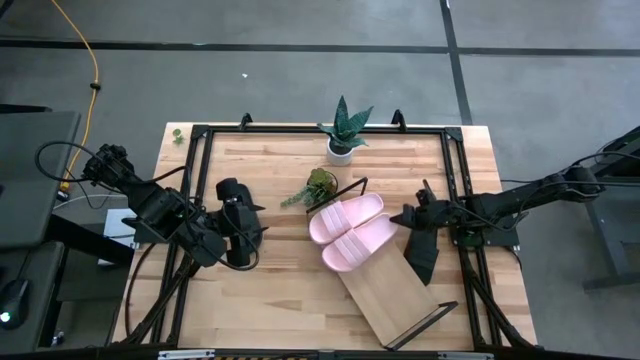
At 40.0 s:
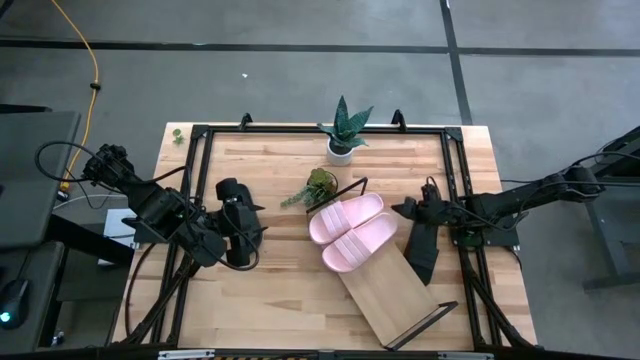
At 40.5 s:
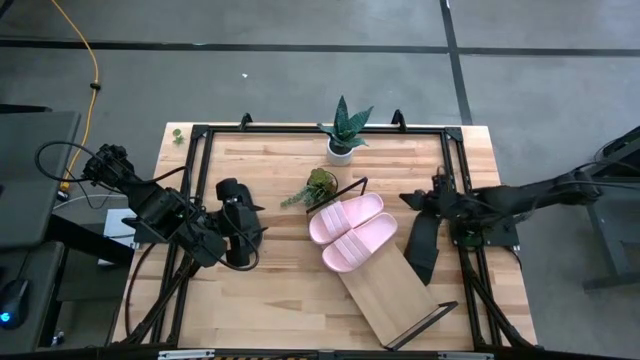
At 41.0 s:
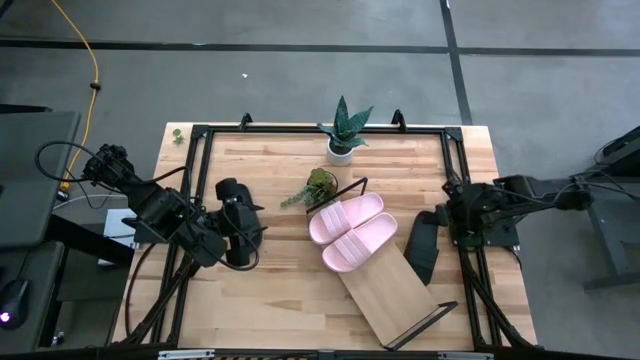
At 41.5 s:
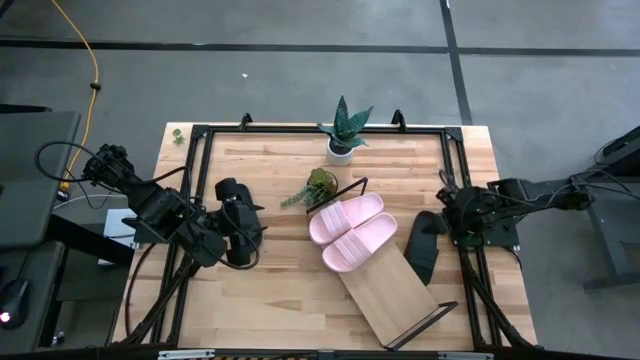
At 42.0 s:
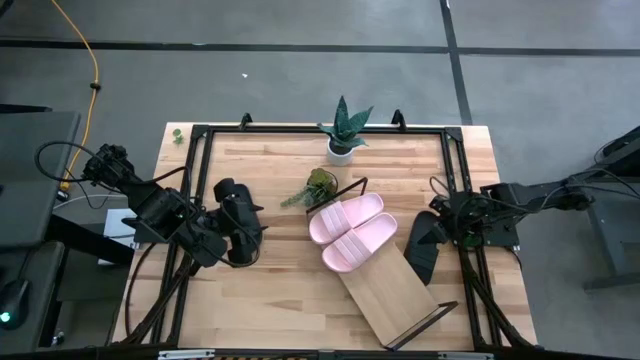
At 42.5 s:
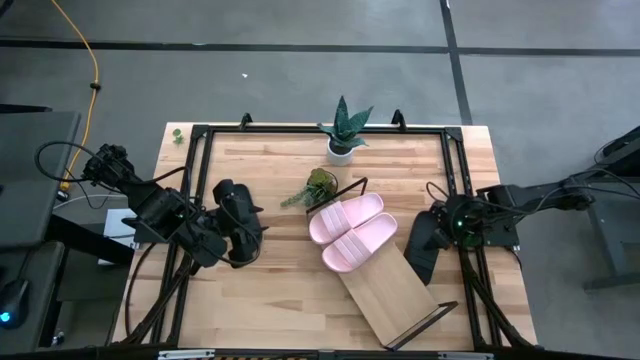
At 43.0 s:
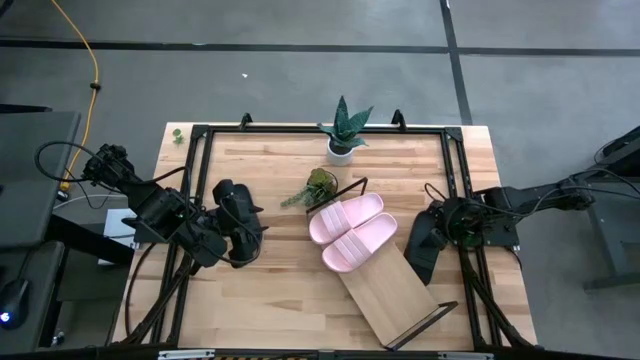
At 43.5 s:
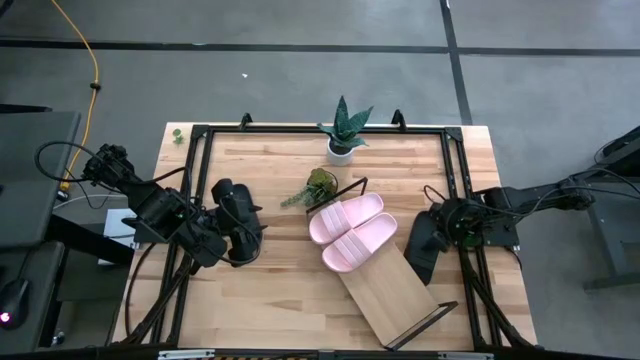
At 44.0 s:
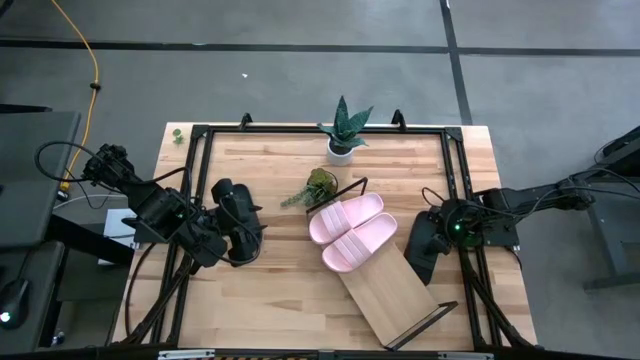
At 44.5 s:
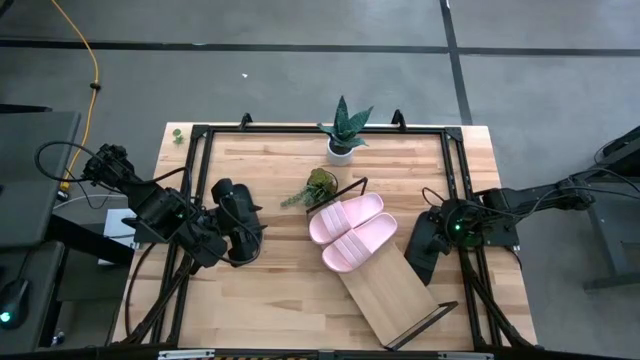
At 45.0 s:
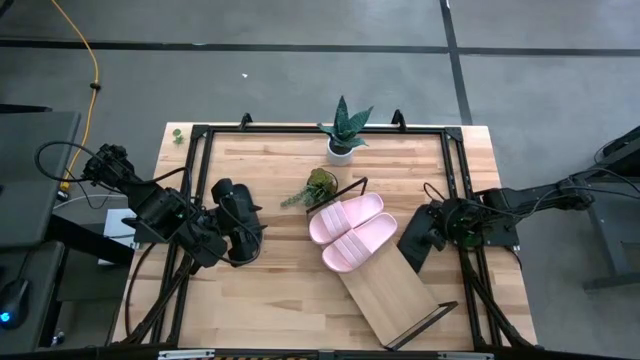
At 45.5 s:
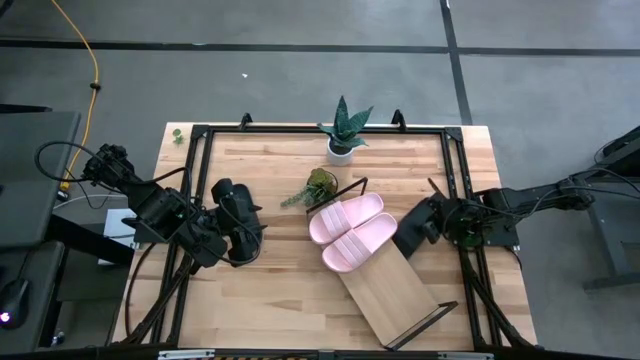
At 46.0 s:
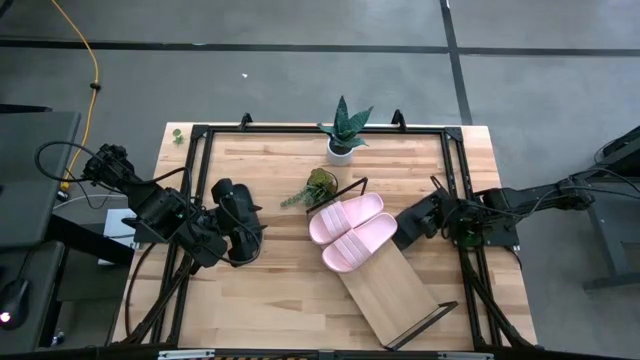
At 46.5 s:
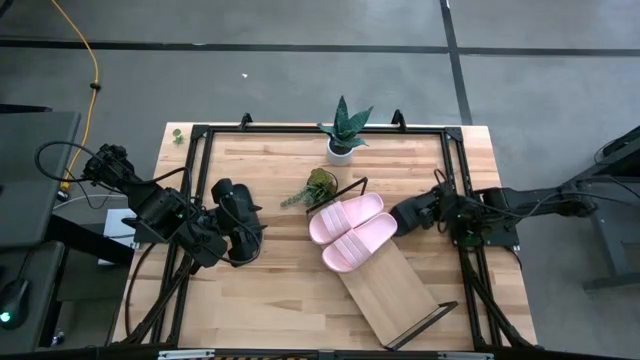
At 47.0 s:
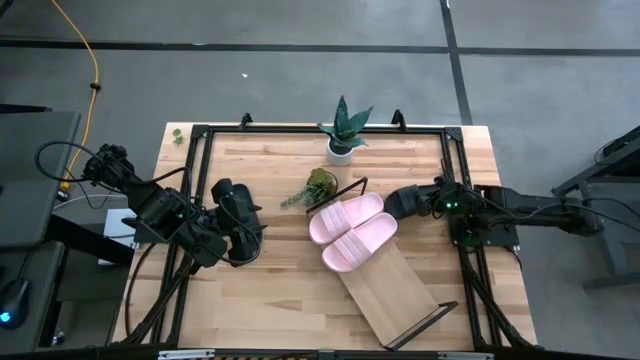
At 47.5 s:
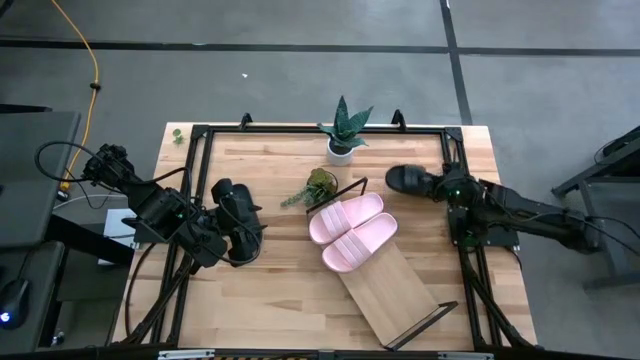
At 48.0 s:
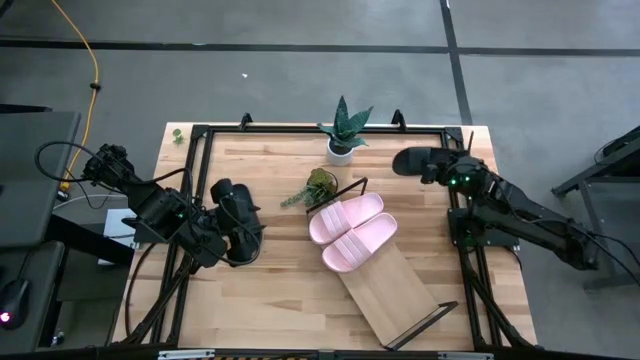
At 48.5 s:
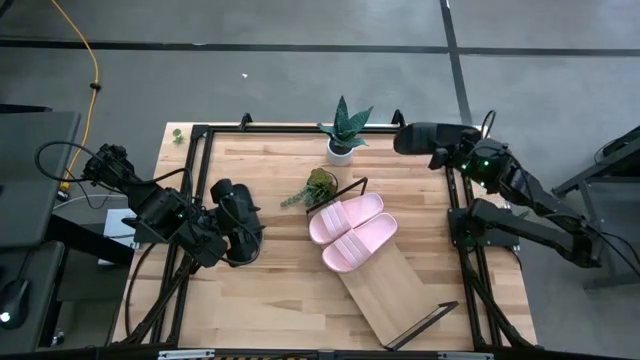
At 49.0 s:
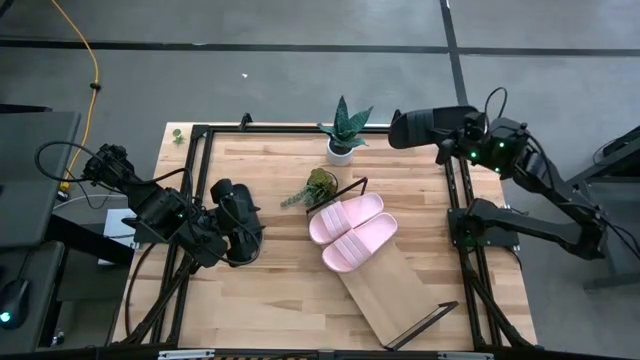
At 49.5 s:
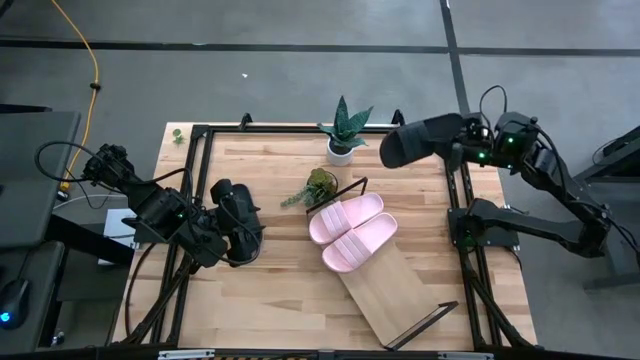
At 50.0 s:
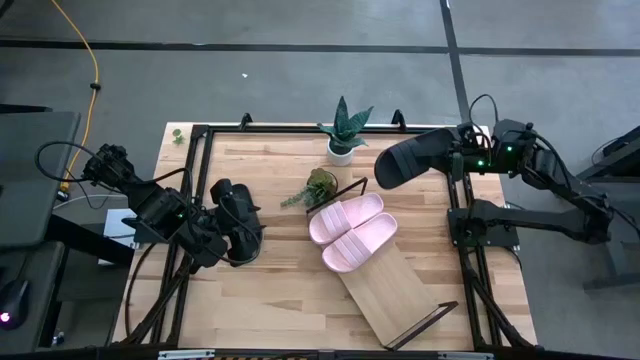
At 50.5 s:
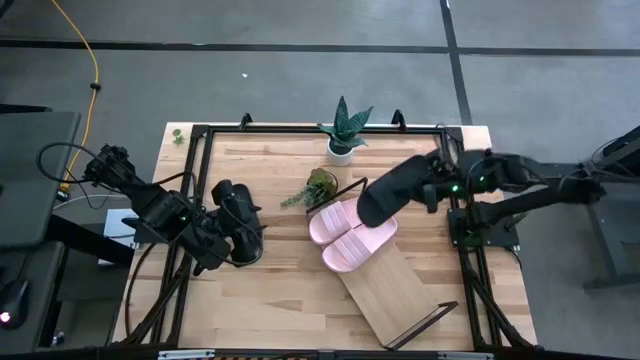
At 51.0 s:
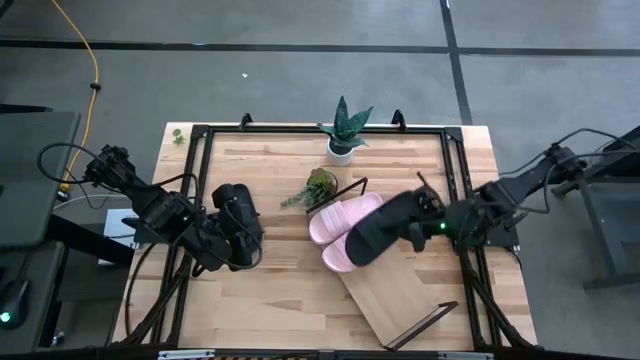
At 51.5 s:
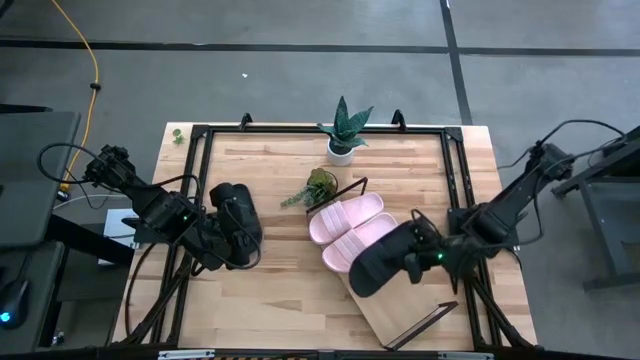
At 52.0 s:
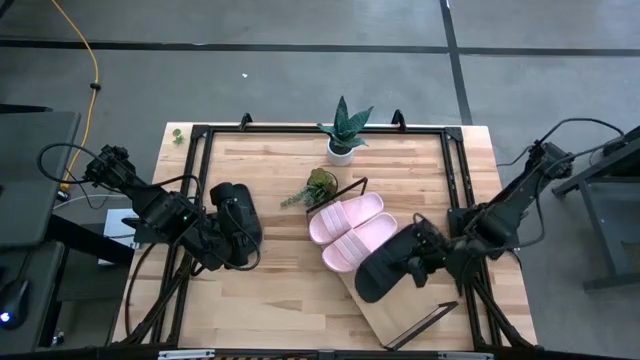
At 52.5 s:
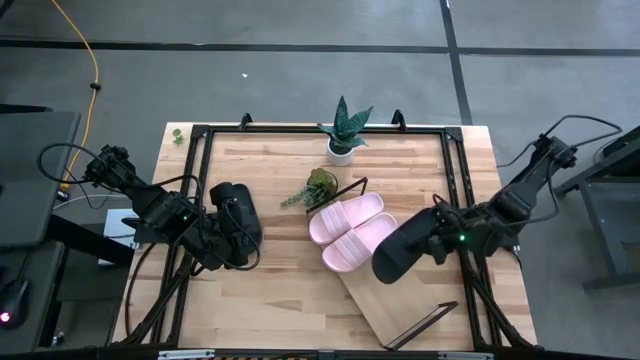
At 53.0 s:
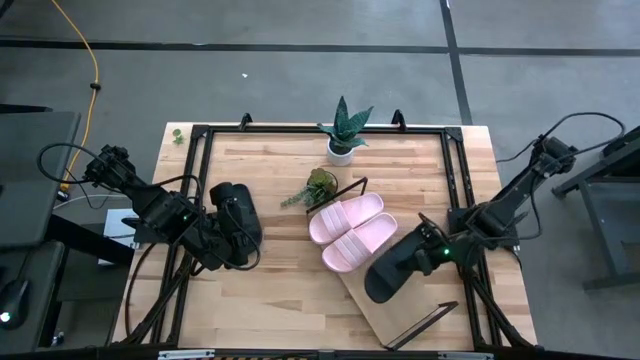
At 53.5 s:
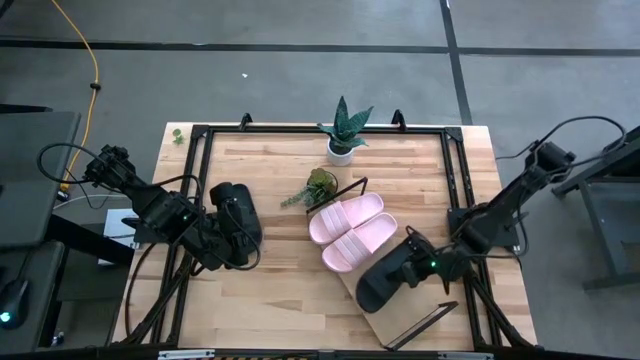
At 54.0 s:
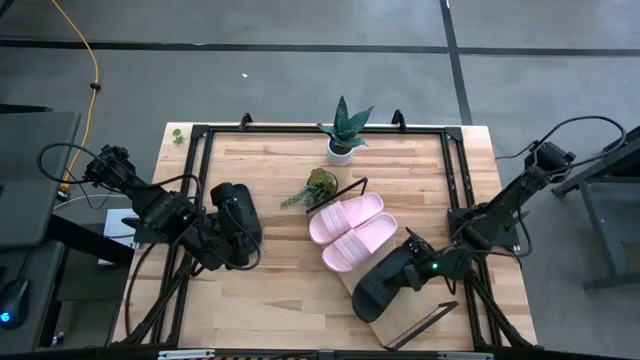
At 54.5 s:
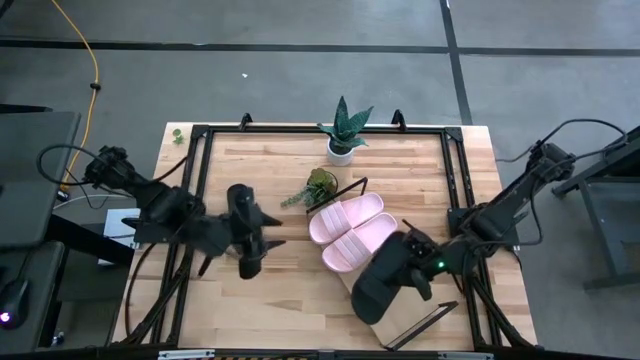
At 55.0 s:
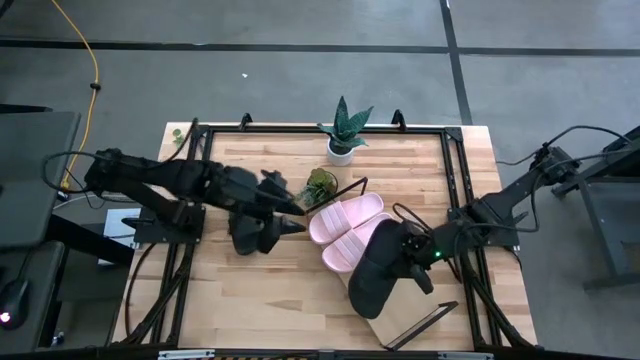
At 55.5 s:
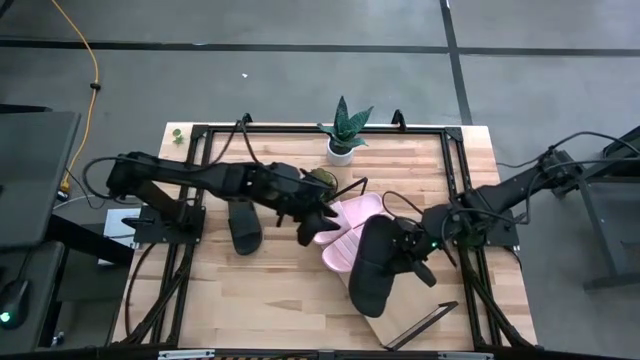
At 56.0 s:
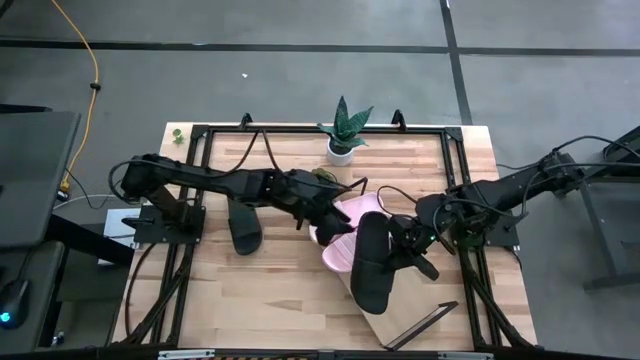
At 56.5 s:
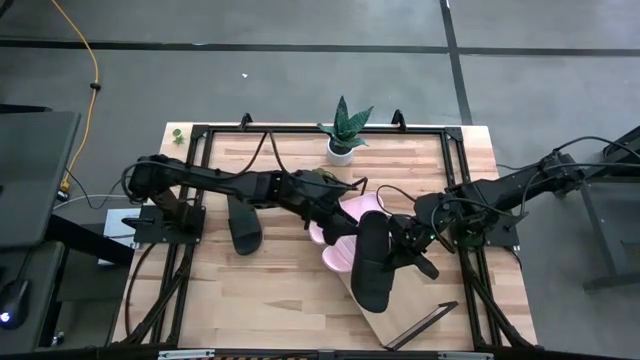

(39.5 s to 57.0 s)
Task: Pick and place slides into the shelf
Put the right black slipper on the shelf

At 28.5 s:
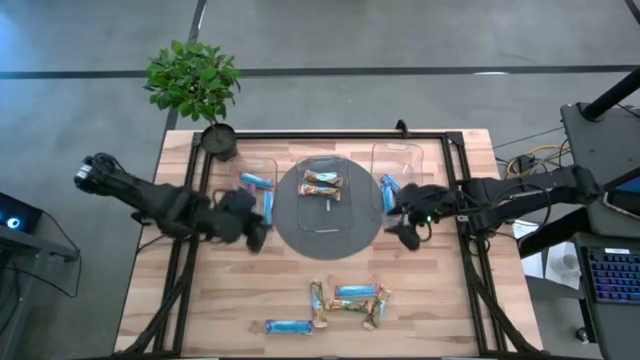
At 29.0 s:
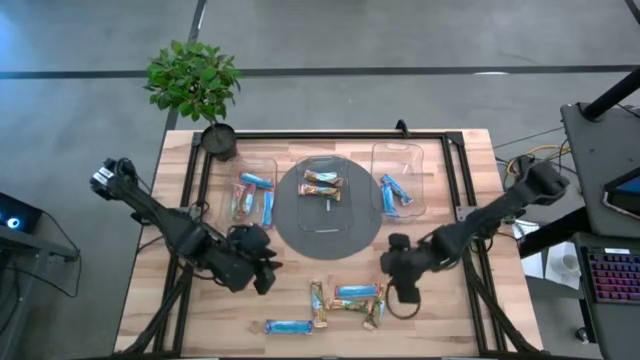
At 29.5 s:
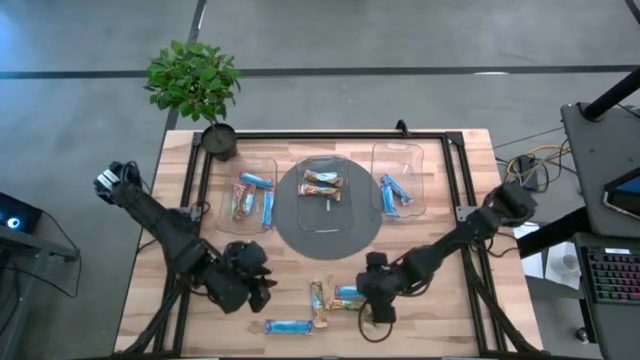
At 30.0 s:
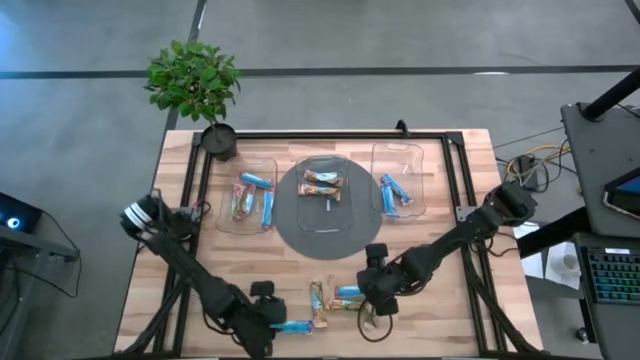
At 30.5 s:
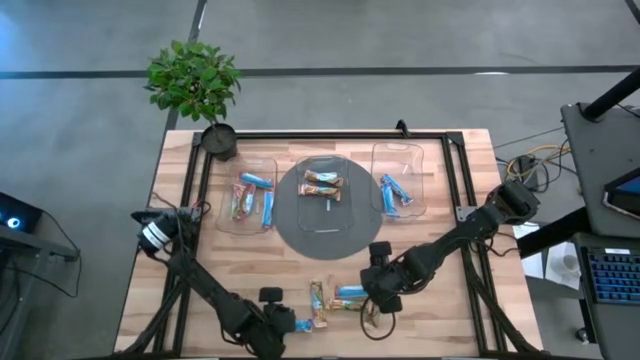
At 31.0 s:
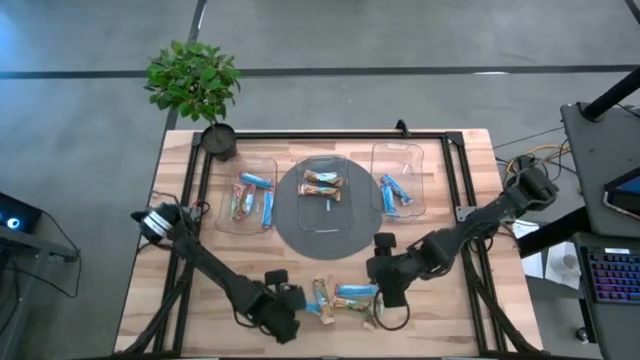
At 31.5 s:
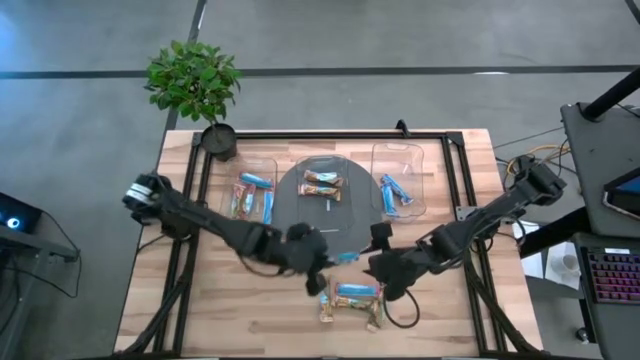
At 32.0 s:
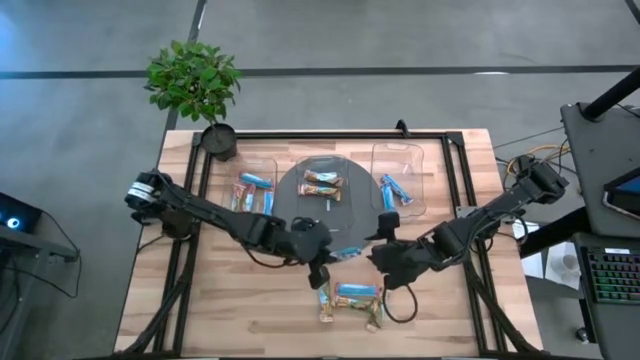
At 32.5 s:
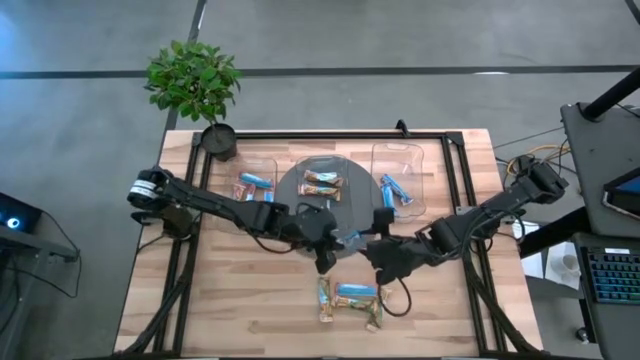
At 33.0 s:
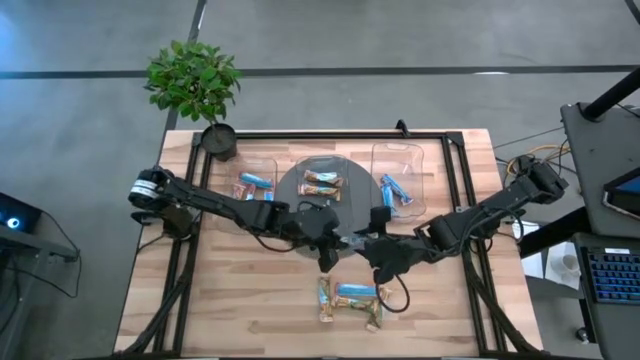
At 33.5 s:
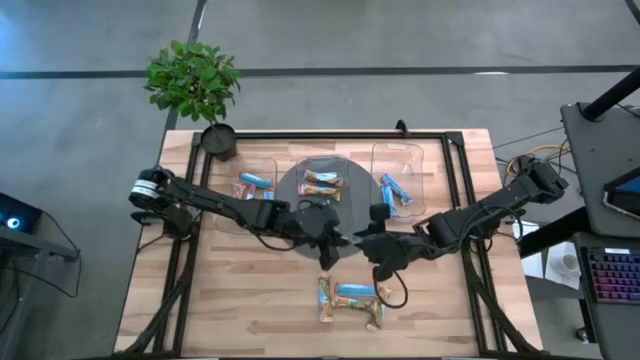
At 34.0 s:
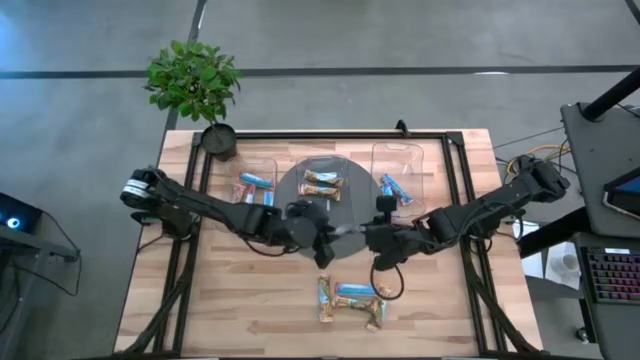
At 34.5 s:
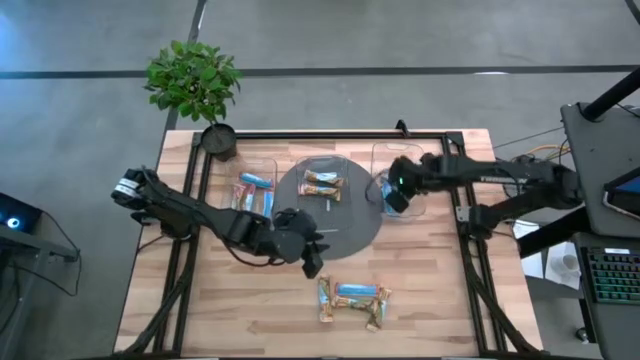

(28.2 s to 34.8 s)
Task: Pick and place Granola Bars by type
Put the blue granola bar into the right transparent bin
